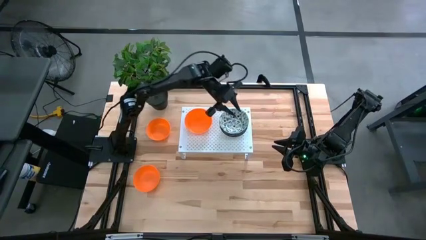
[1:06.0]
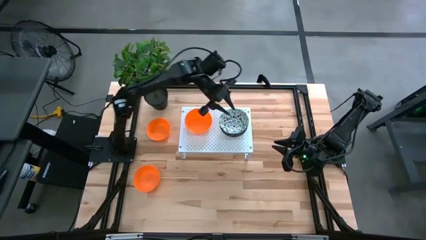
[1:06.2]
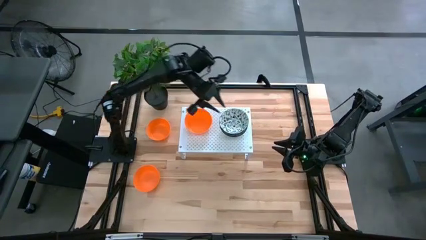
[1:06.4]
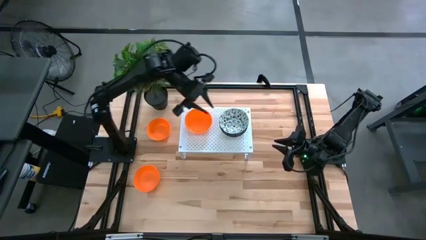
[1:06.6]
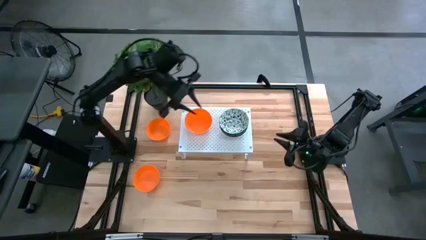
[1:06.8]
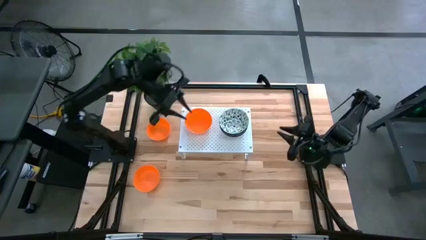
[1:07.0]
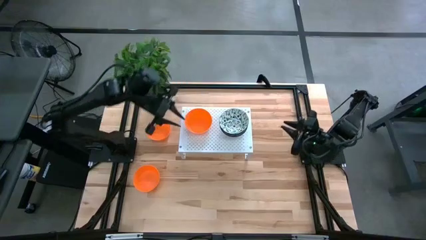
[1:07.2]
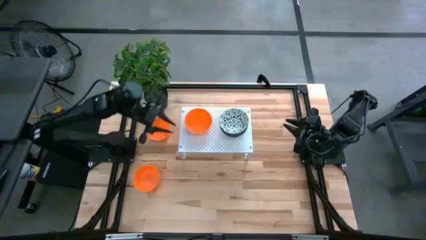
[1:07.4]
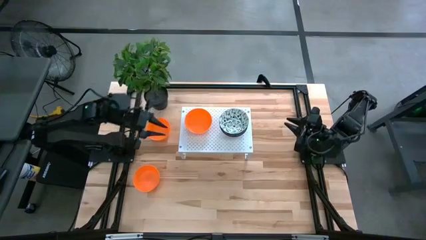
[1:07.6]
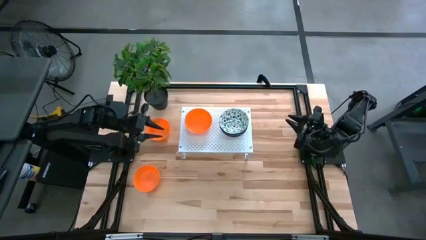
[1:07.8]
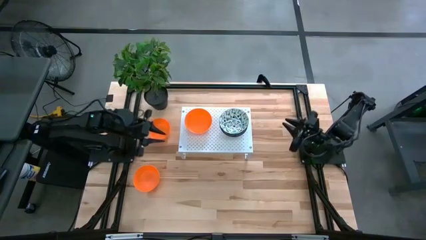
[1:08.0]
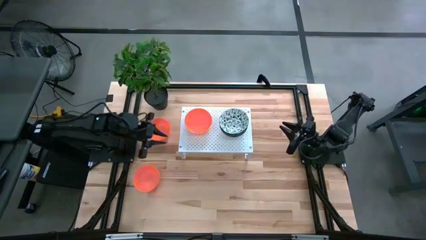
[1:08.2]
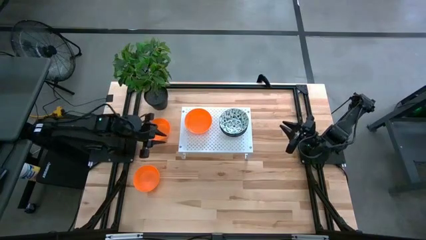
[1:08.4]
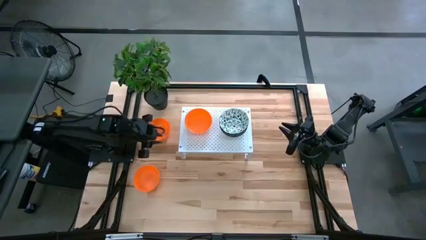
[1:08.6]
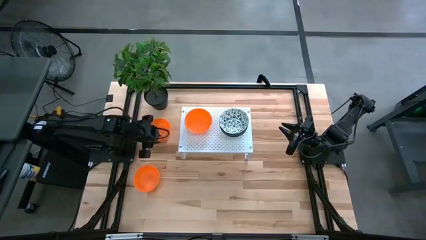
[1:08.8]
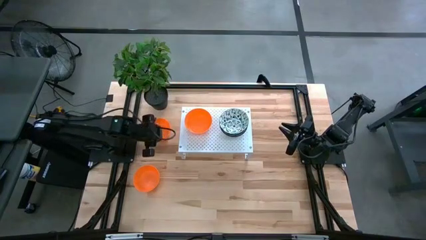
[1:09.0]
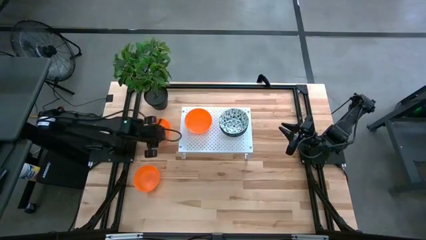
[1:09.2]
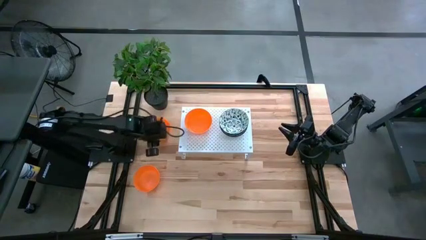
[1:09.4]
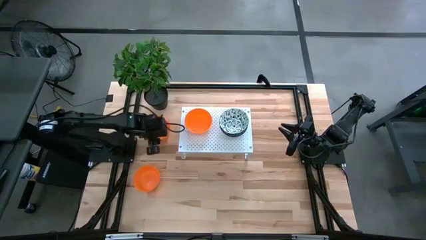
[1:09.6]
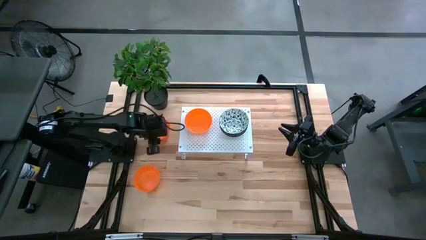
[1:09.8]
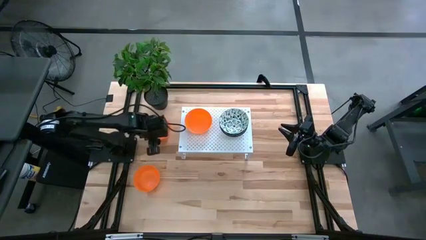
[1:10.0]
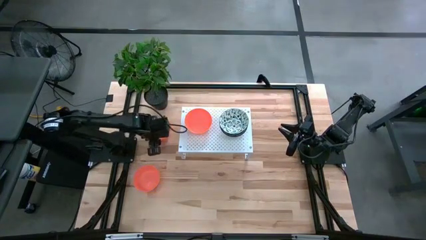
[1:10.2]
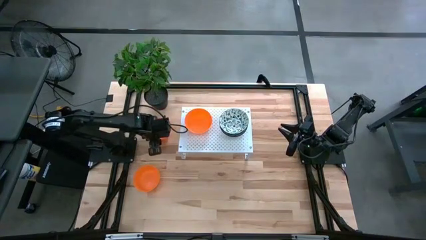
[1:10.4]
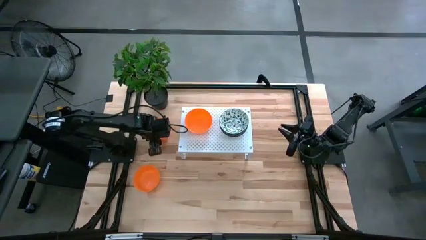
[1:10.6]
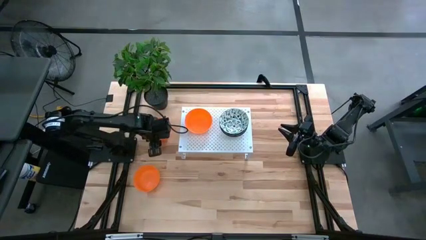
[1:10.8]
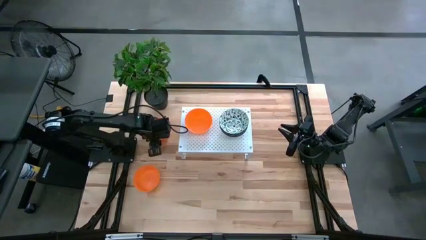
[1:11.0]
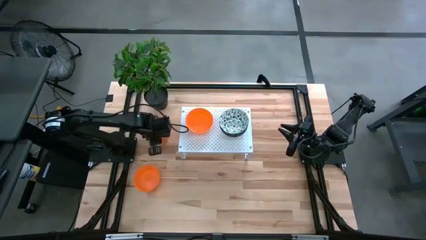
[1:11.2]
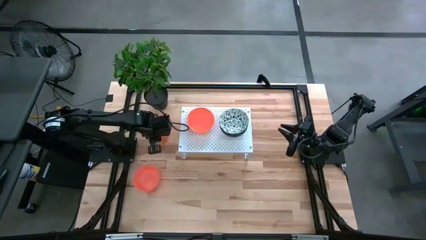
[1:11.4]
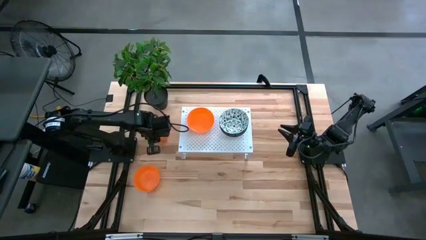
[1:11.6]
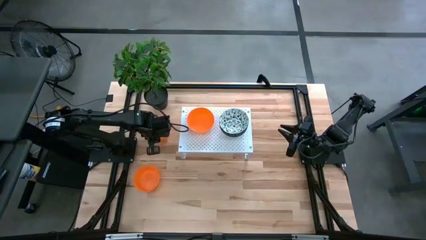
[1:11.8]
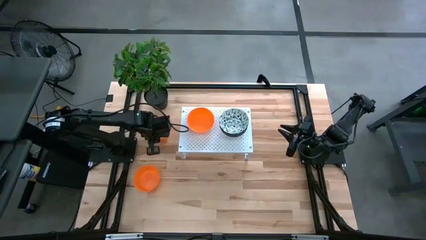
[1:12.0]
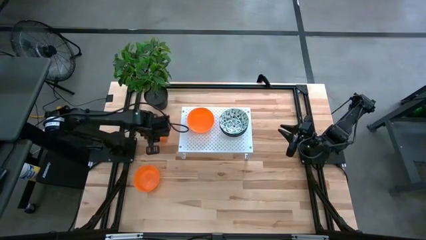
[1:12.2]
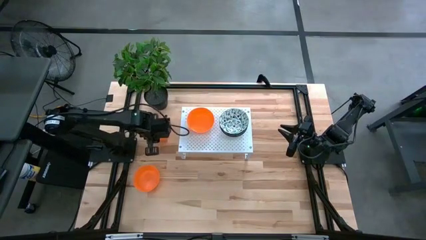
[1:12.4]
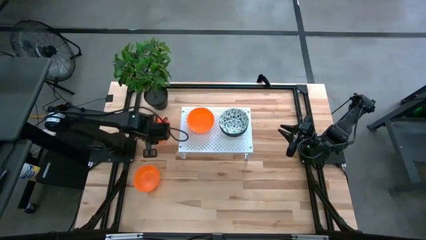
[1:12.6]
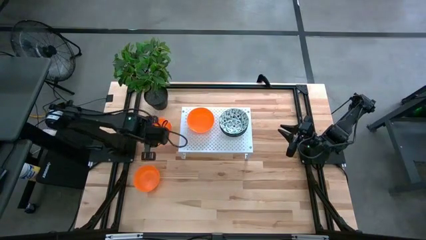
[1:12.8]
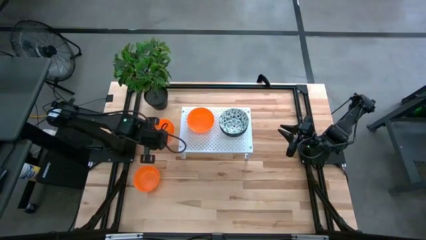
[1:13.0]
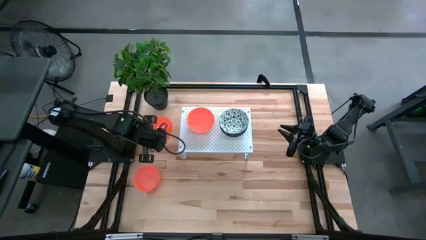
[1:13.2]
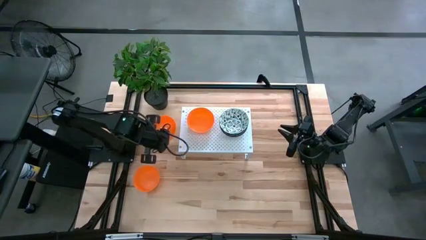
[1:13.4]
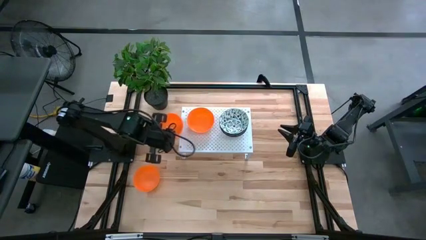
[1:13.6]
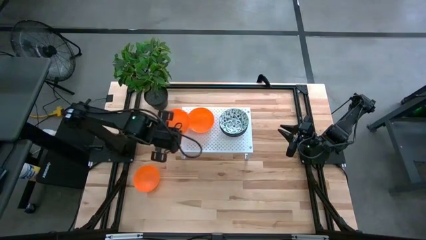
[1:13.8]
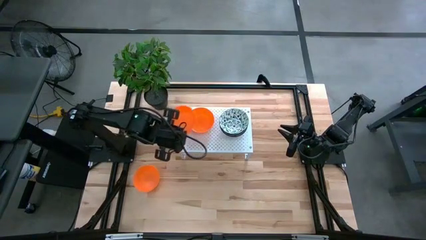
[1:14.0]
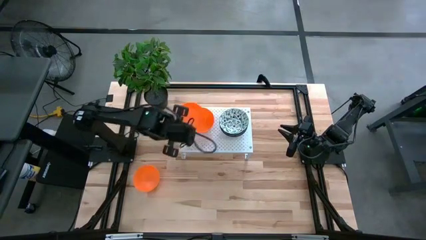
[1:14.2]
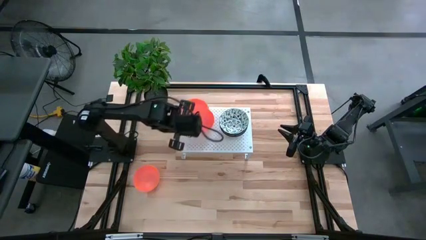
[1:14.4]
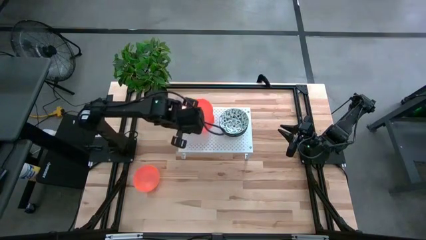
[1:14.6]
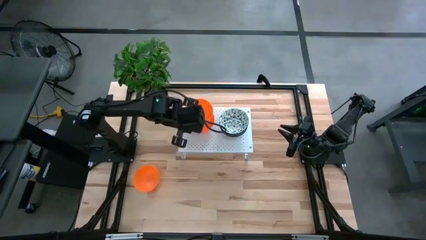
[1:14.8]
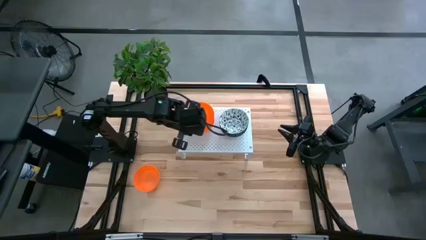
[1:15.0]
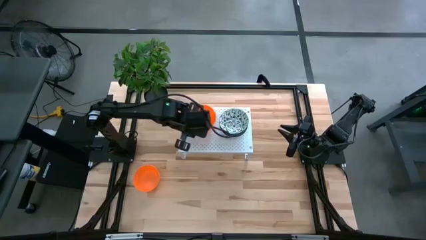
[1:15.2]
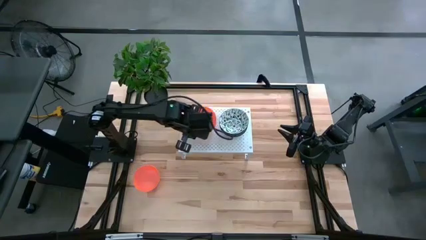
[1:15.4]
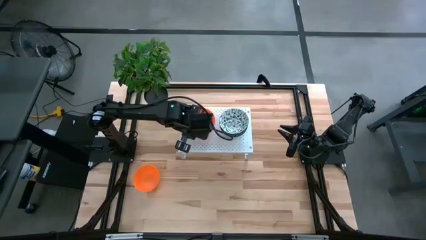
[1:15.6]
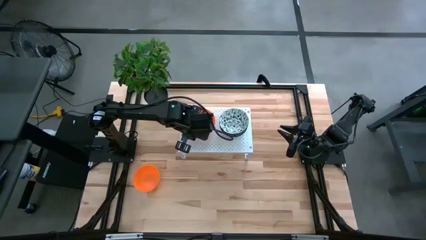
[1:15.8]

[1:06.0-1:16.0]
Task: Pick & Place Mini bowls
Stack the top orange bowl on the orange bowl on the shelf

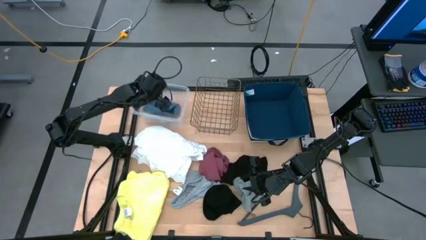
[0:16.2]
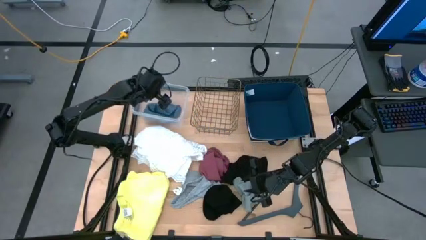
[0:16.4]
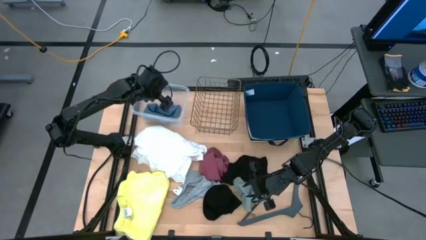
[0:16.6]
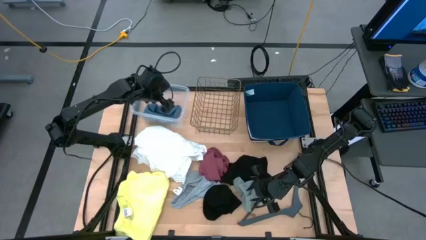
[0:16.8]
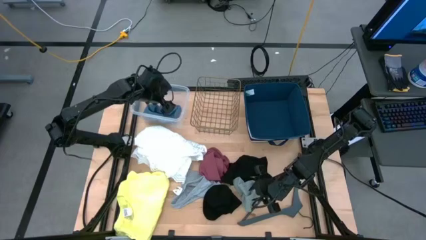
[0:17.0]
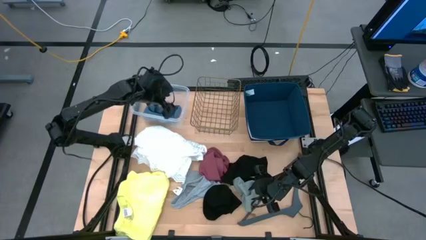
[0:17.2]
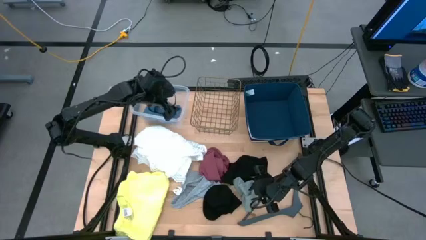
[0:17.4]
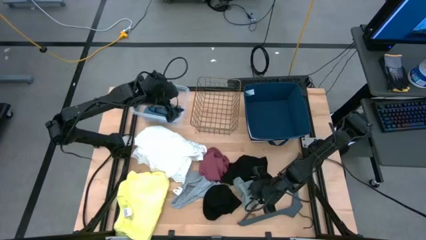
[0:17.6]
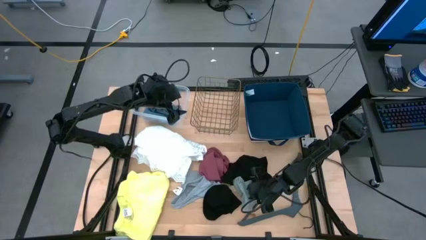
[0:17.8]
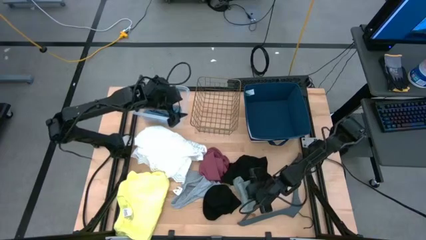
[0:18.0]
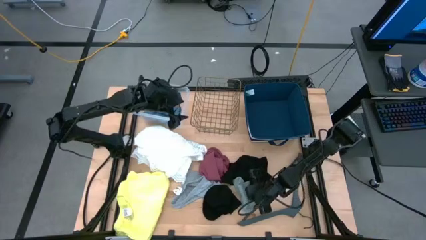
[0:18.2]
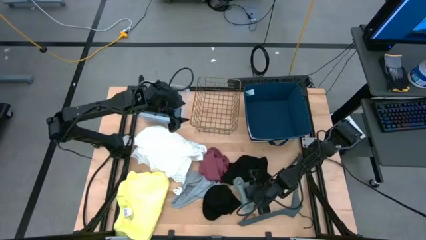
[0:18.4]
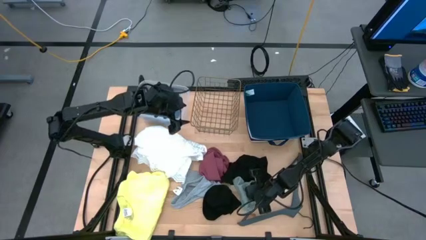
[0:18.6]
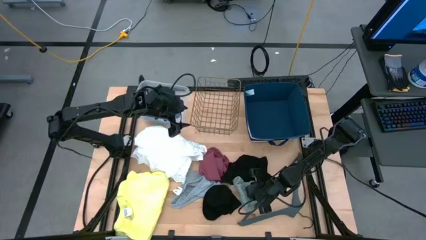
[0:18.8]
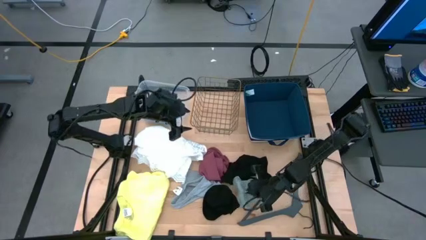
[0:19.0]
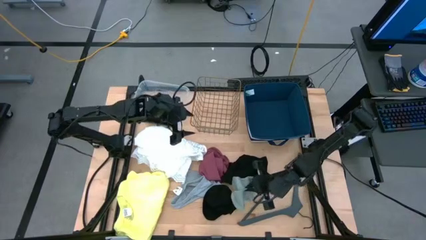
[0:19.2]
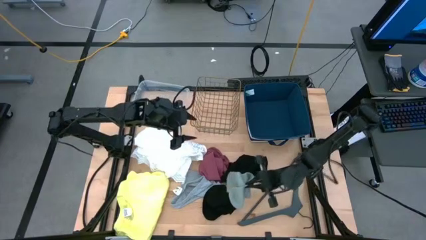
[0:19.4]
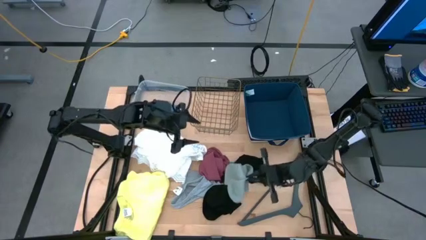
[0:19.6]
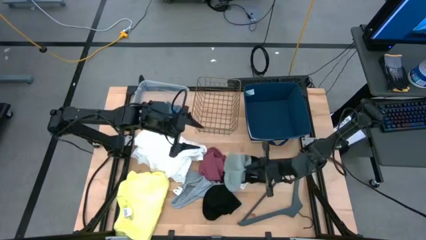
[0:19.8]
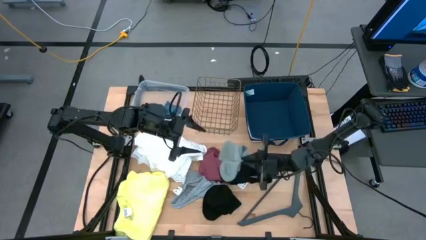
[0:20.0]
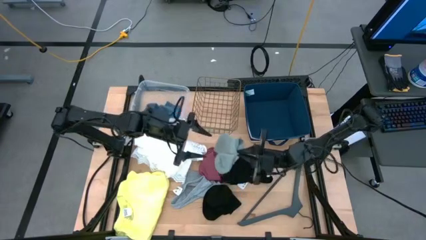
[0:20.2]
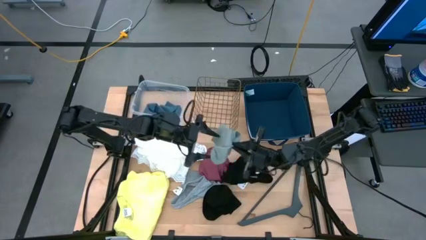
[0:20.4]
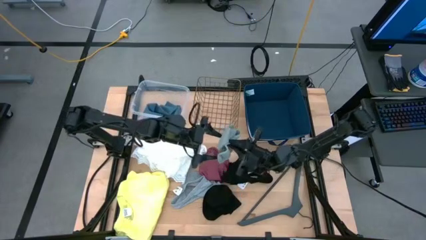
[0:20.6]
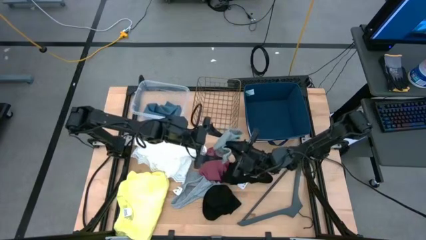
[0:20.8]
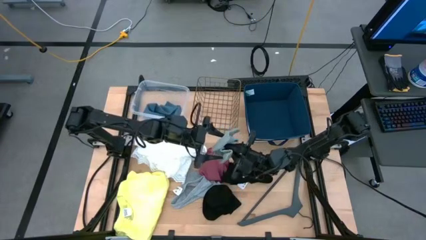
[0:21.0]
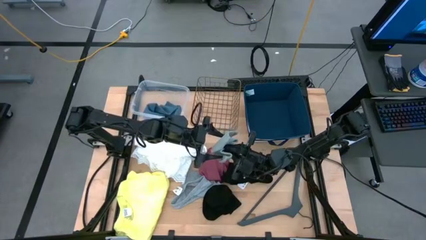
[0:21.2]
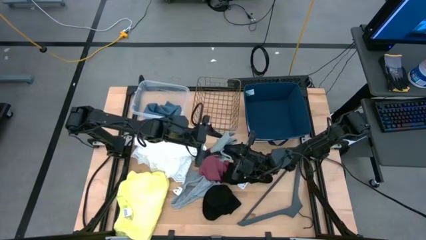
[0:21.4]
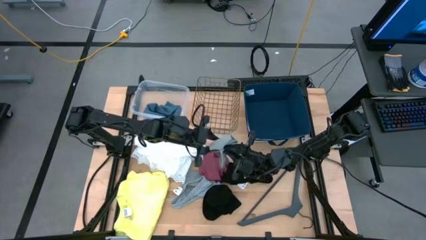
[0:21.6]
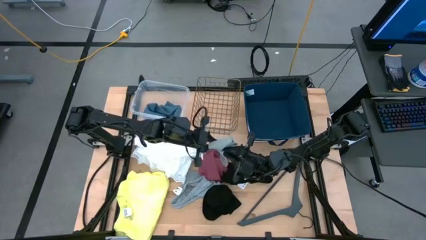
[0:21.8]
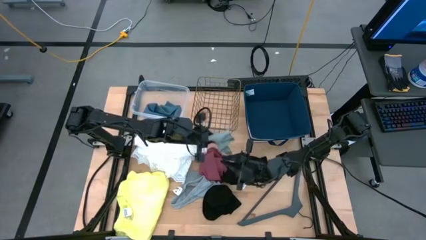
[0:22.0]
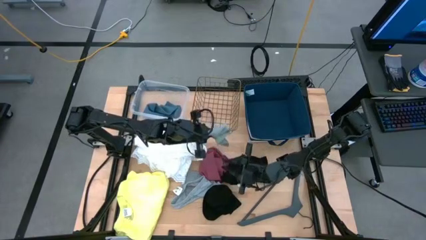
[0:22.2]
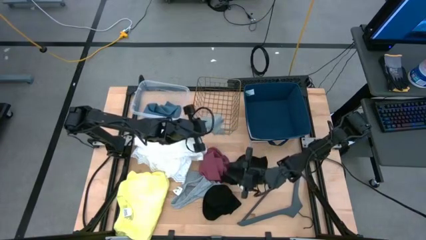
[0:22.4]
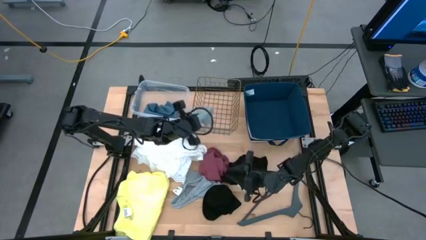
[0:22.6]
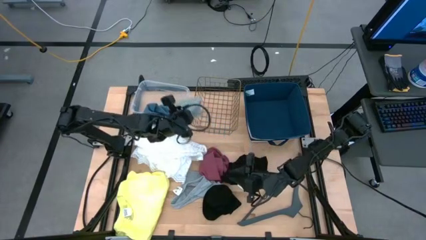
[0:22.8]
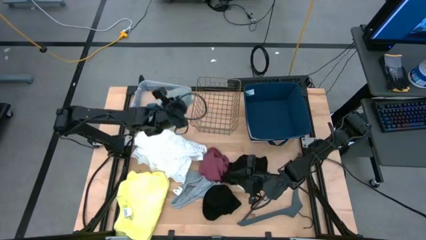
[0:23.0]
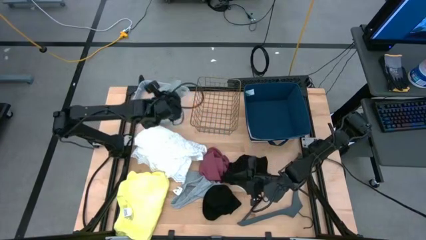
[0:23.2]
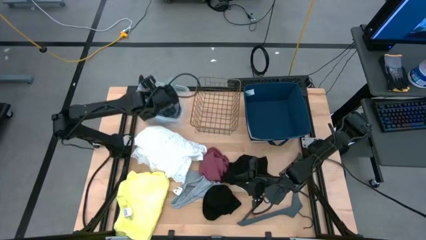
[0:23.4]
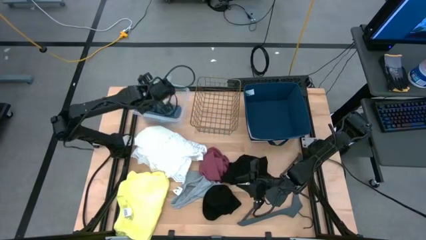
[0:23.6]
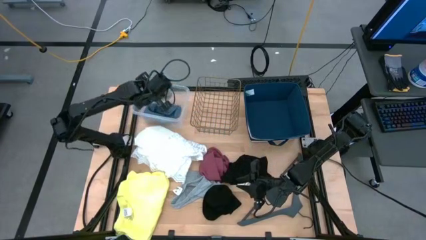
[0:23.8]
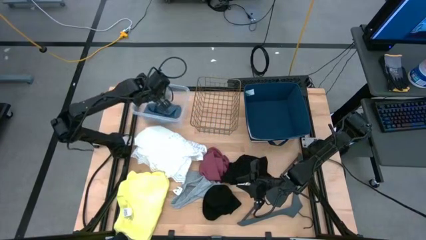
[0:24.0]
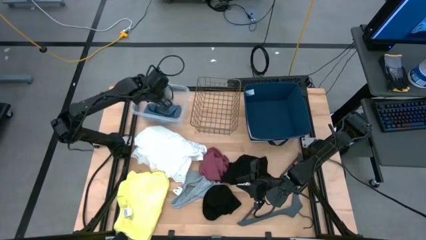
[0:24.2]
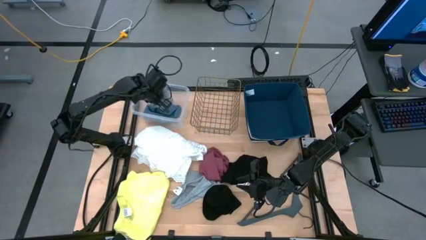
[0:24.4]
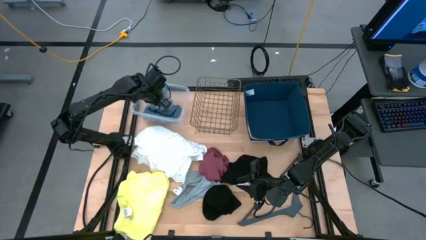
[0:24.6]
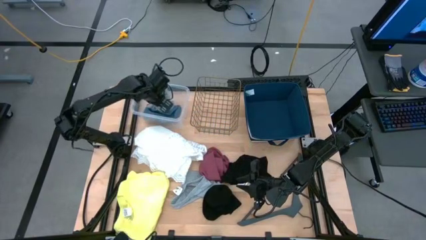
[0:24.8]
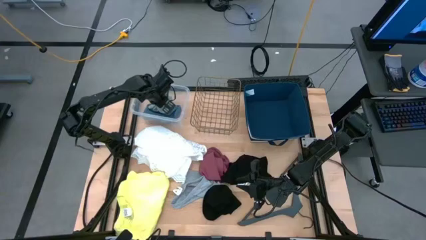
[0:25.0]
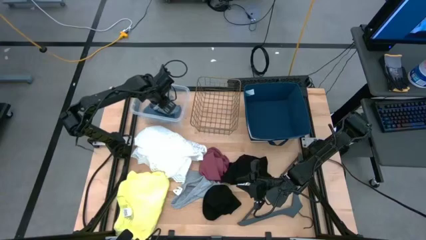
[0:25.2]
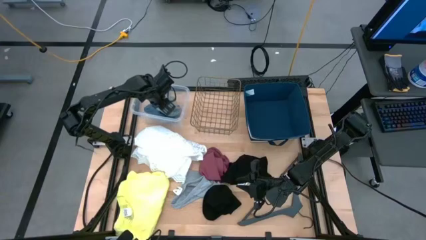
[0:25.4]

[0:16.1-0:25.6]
Task: Pick & Place Cloths
Put the gray sock into the transparent bin
